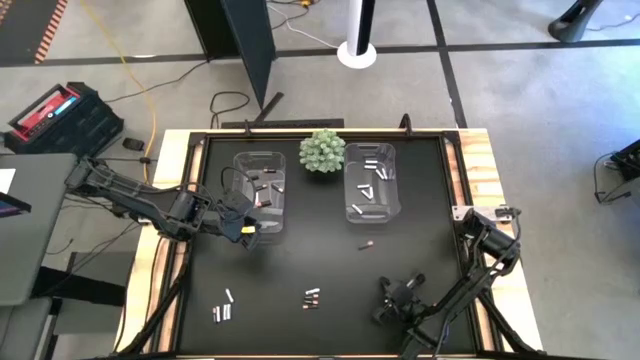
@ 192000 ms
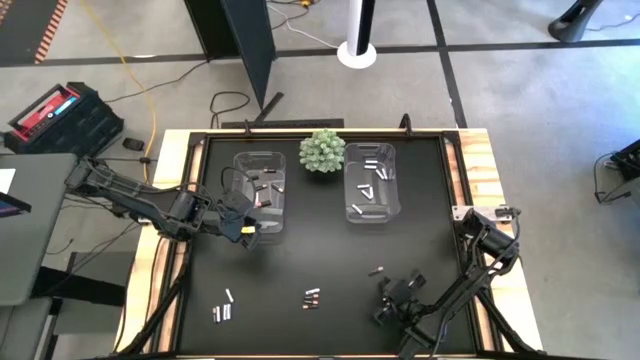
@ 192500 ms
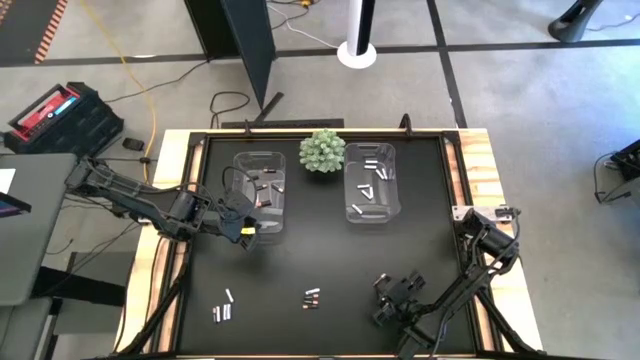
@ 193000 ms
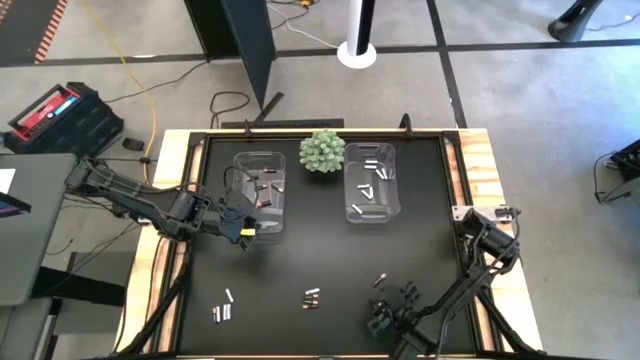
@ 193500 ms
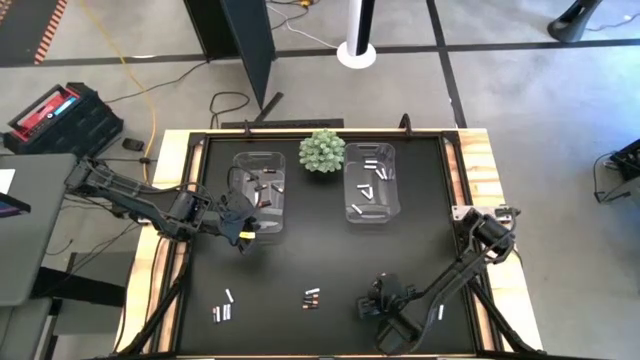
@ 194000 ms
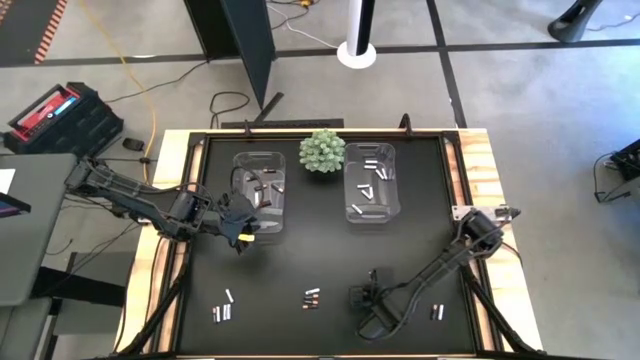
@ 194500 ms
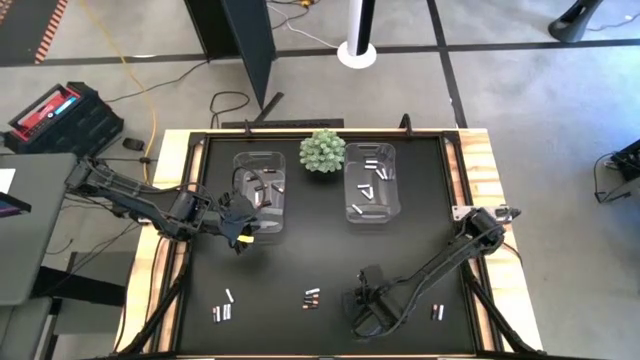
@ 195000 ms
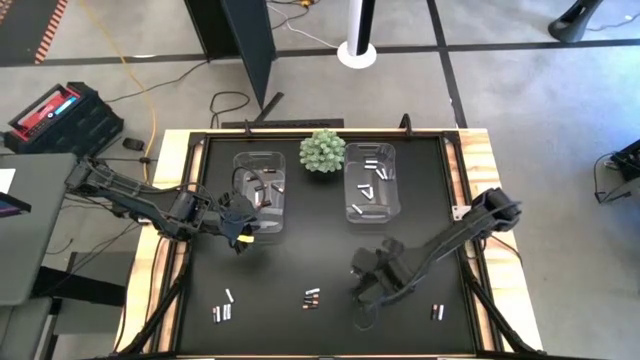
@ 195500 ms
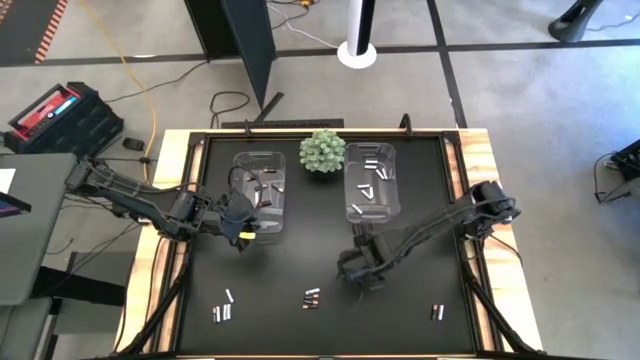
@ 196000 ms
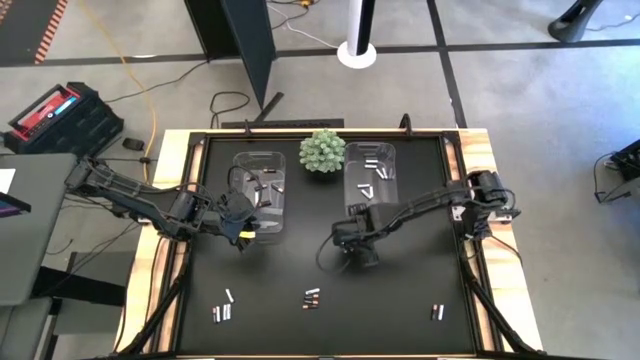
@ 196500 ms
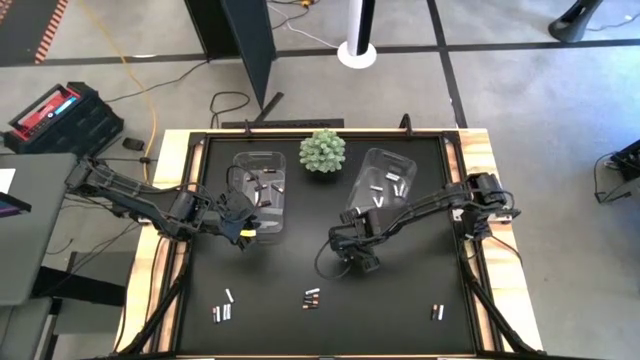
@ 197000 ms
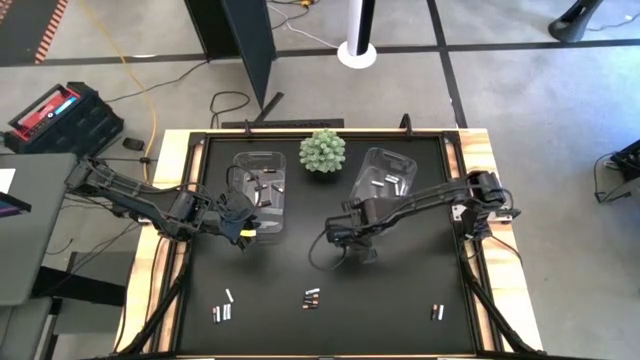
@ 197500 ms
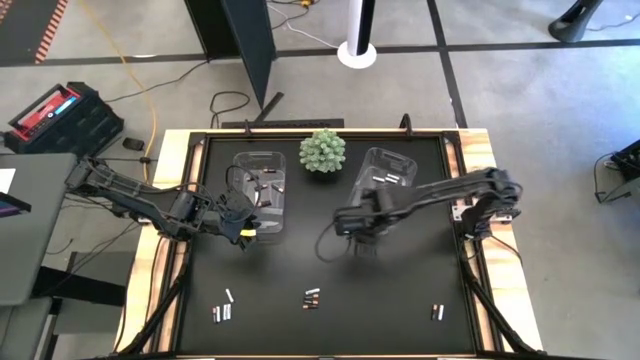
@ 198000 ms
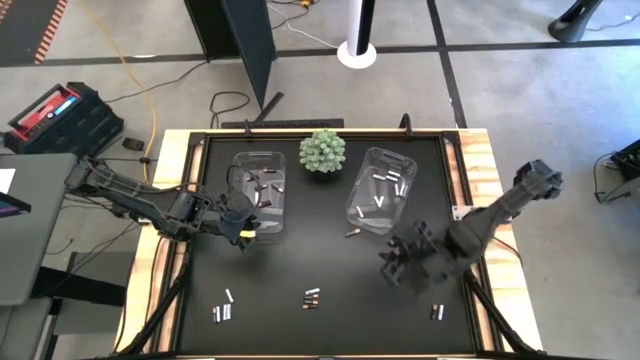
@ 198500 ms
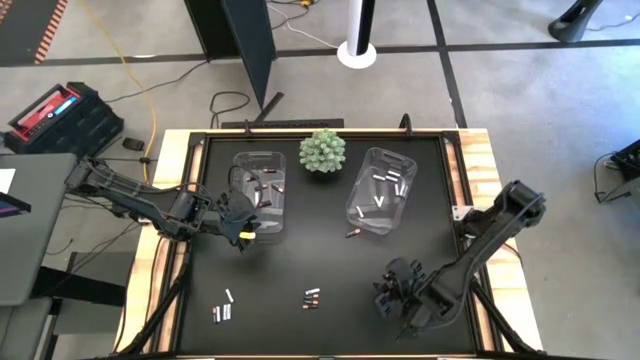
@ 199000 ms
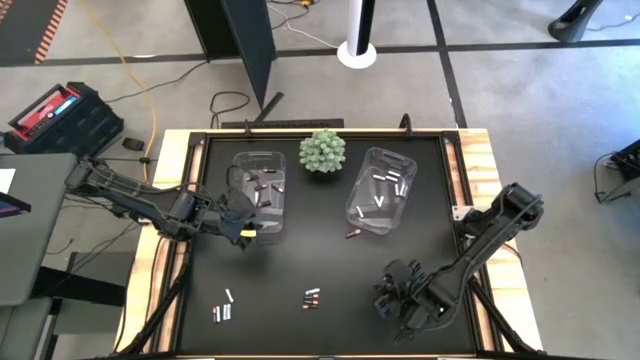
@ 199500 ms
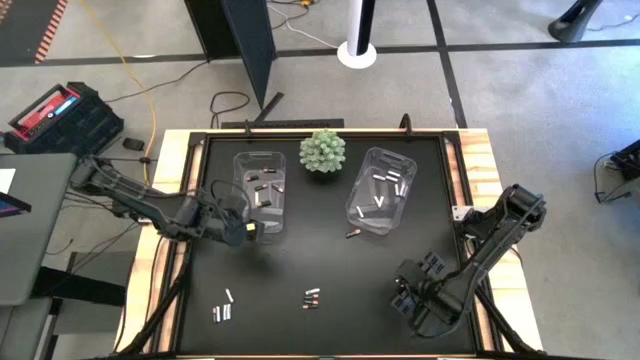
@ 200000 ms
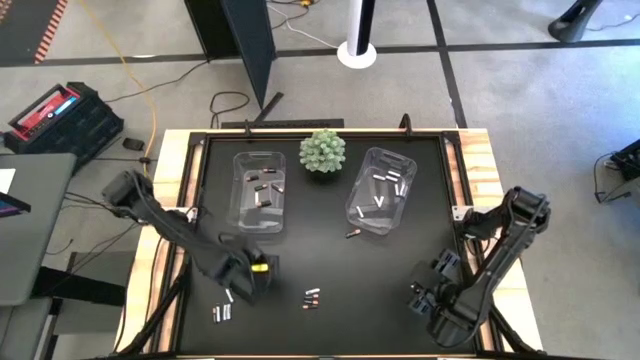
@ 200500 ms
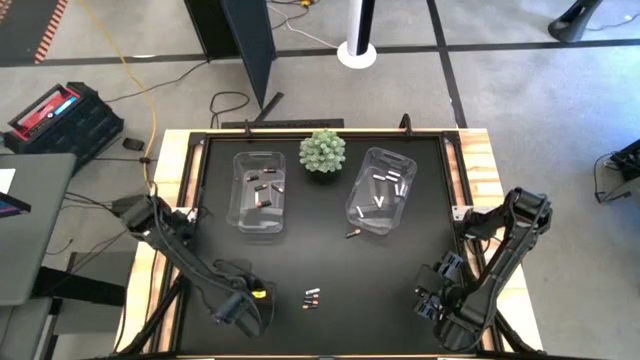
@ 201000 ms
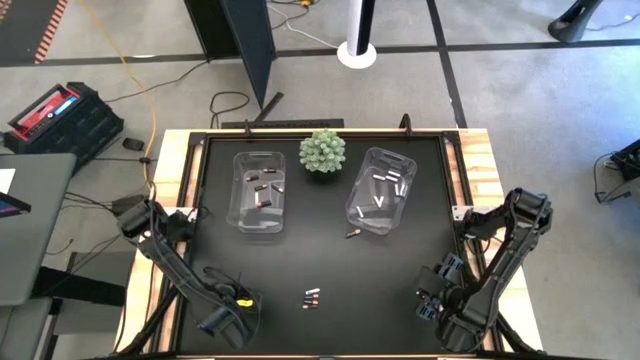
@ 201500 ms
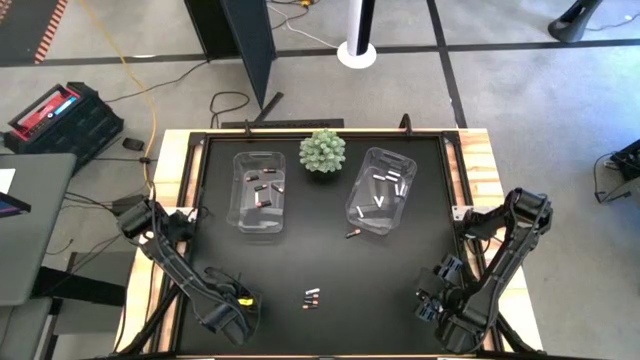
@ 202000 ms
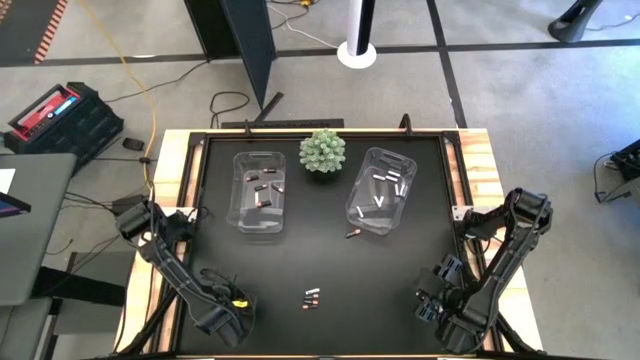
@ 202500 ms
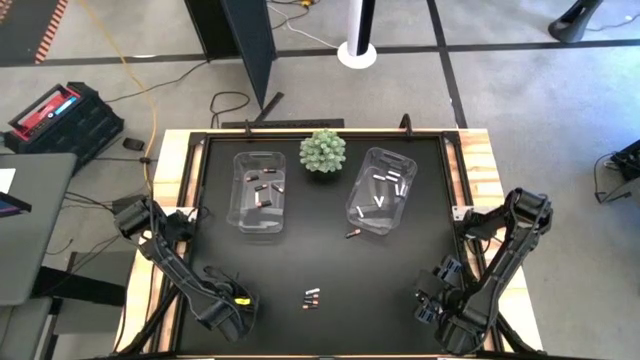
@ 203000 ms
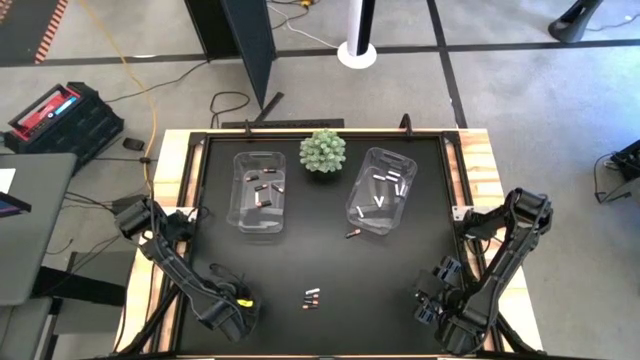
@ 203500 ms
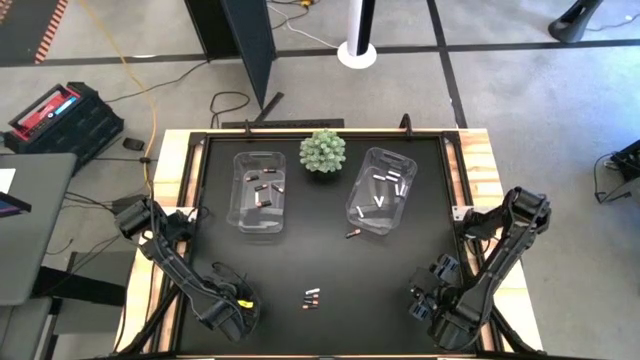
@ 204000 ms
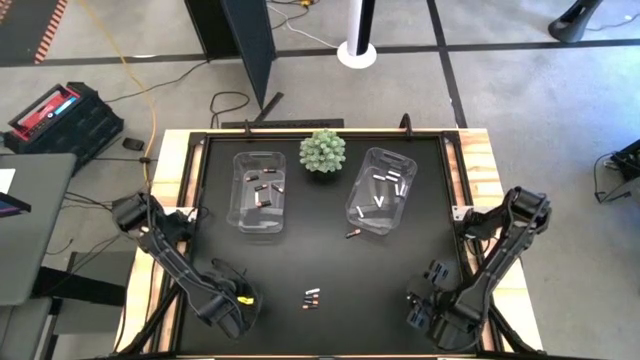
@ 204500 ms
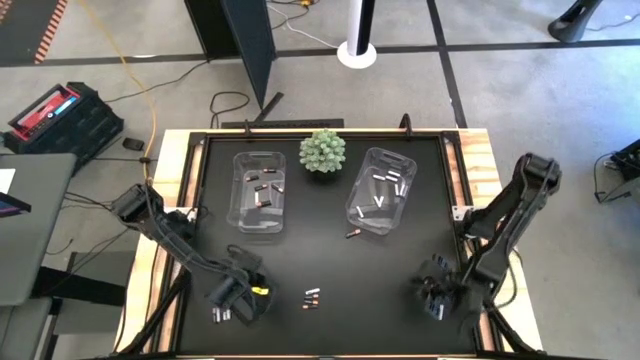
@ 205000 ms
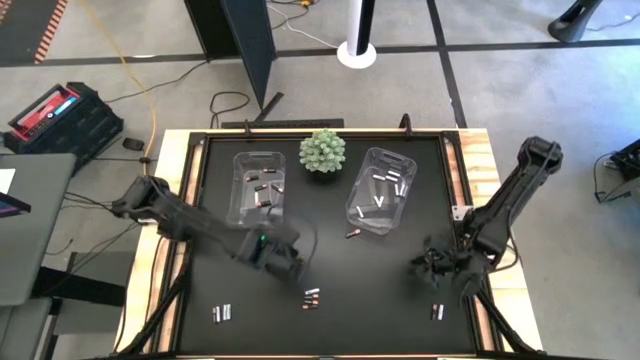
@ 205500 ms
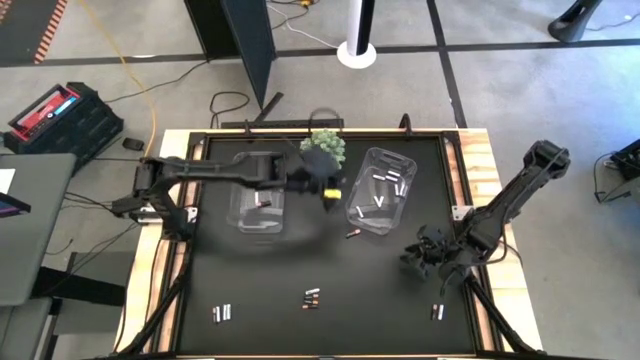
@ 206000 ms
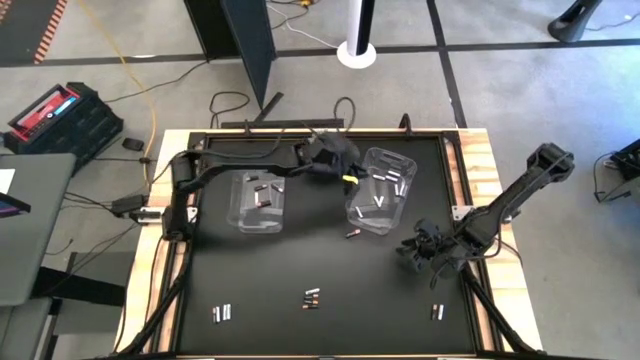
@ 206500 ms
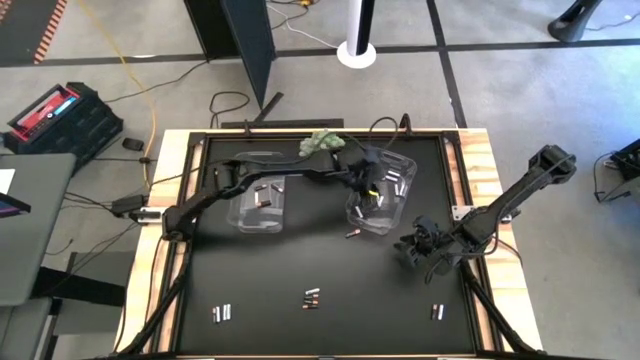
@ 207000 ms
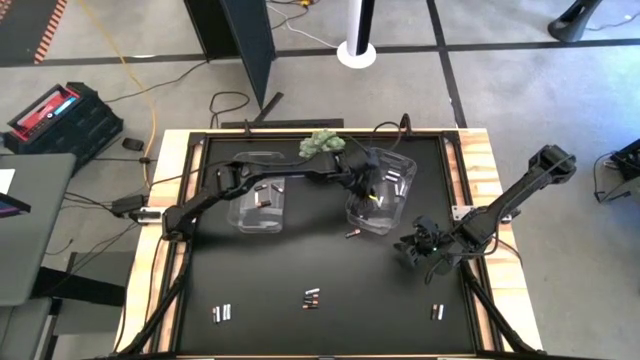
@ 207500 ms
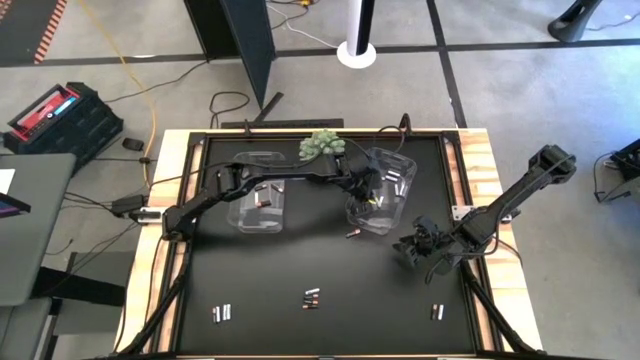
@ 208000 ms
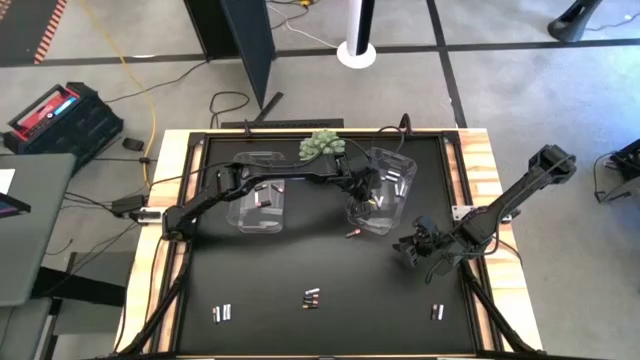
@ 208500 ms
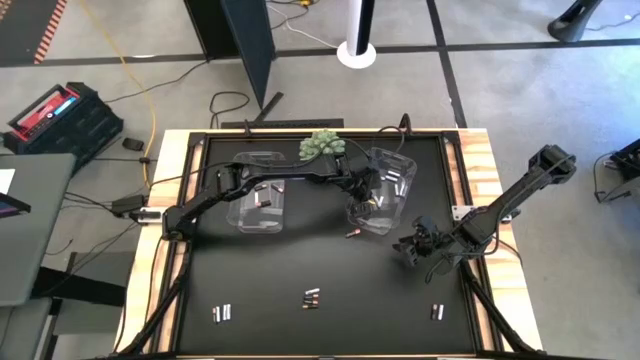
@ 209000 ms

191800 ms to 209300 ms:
Task: Sort batteries
Put the white-blue battery into the right transparent bin

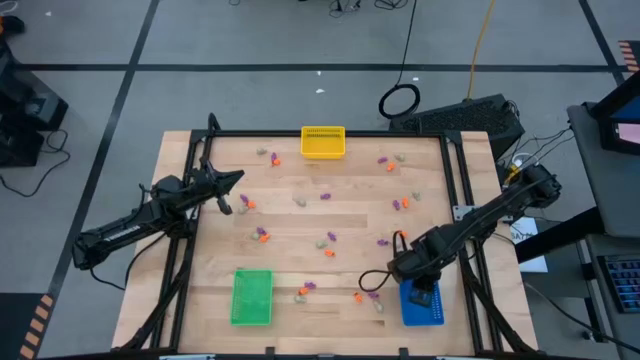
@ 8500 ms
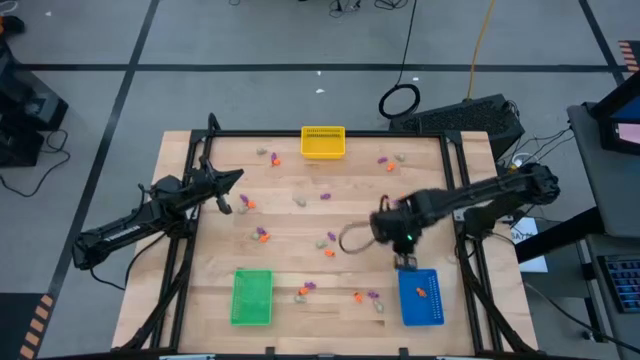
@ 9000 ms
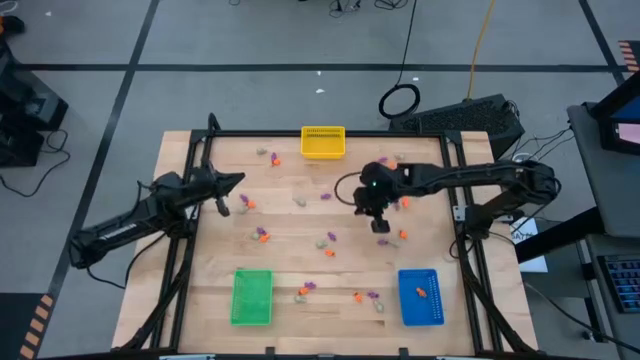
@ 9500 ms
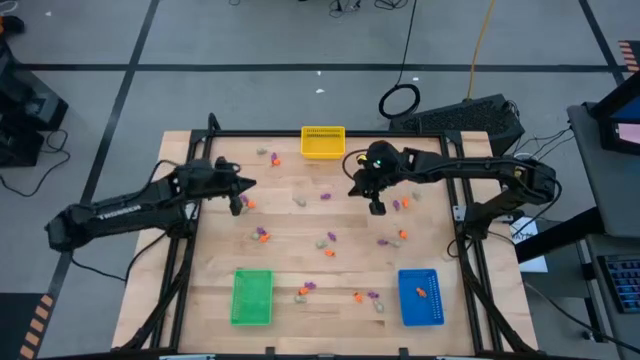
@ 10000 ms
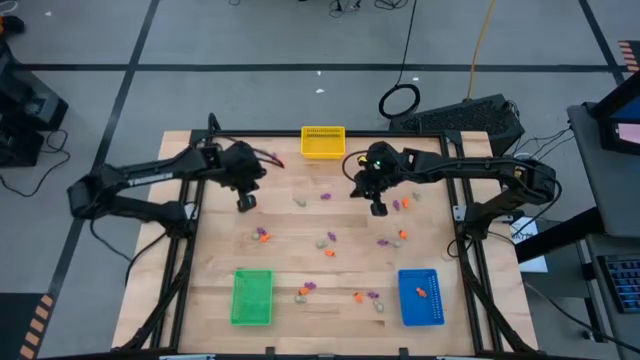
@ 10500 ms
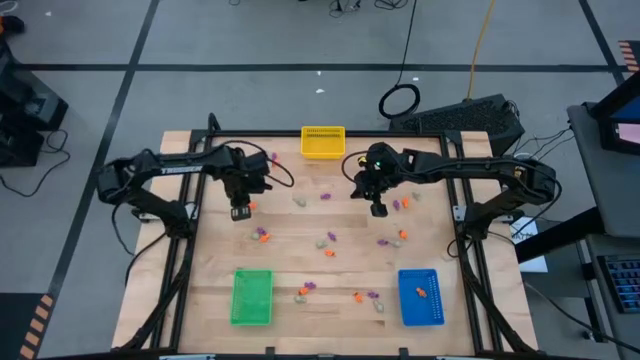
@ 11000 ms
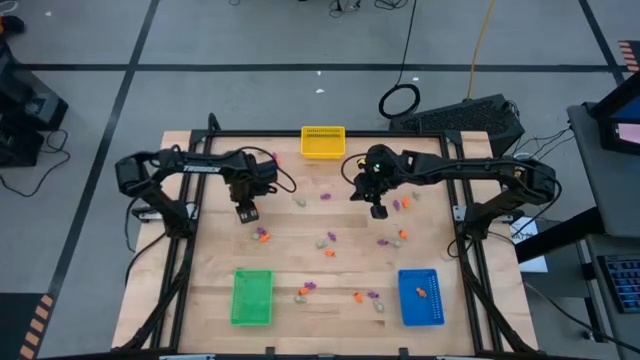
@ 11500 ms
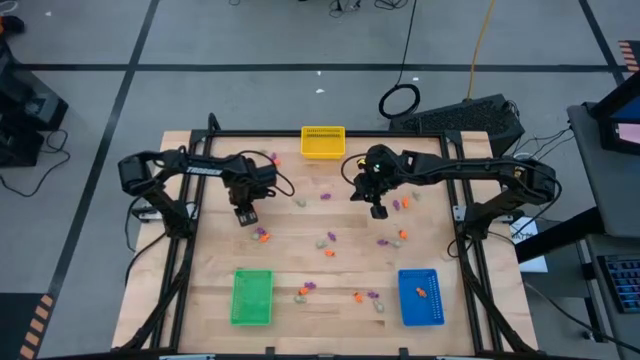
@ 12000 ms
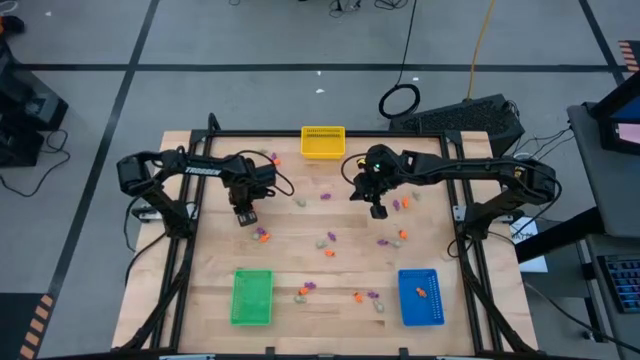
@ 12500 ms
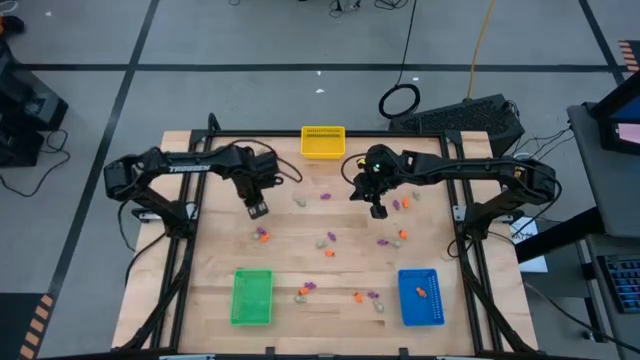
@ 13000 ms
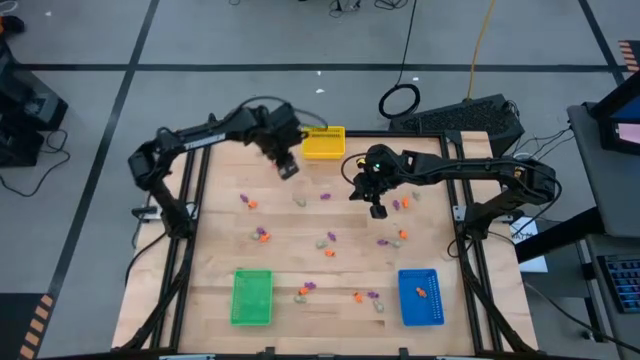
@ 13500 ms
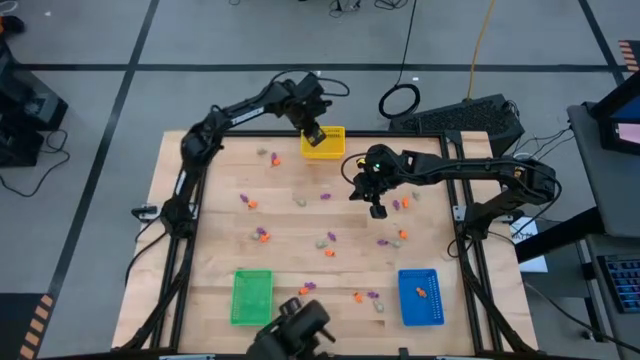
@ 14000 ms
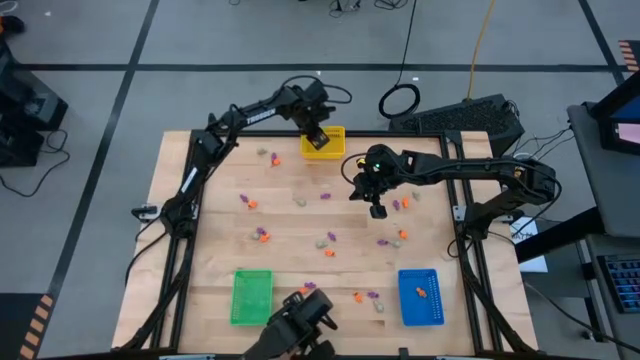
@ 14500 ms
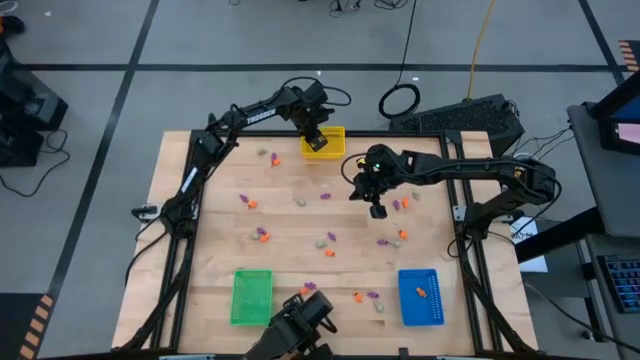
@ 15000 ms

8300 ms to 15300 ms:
Task: Sort Halloween decoration
Put the gray skull toy into the yellow bin
